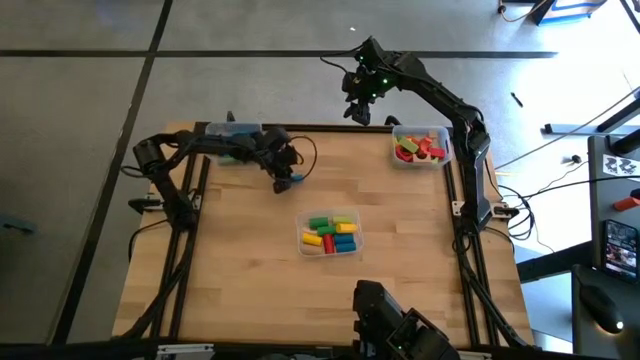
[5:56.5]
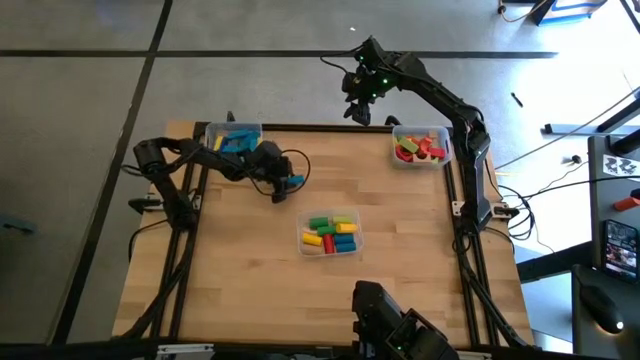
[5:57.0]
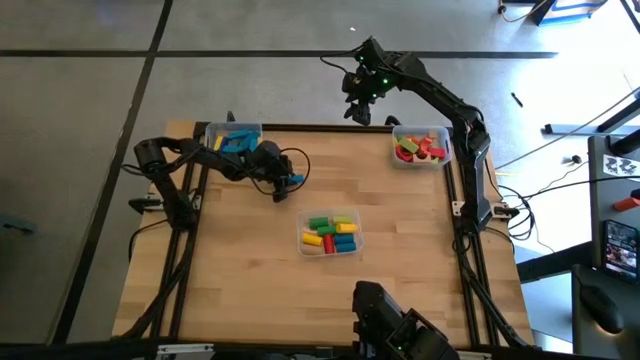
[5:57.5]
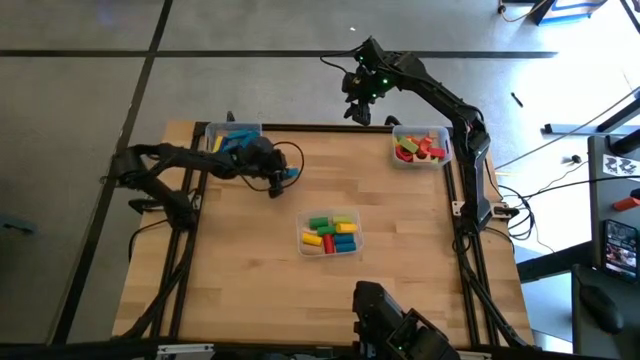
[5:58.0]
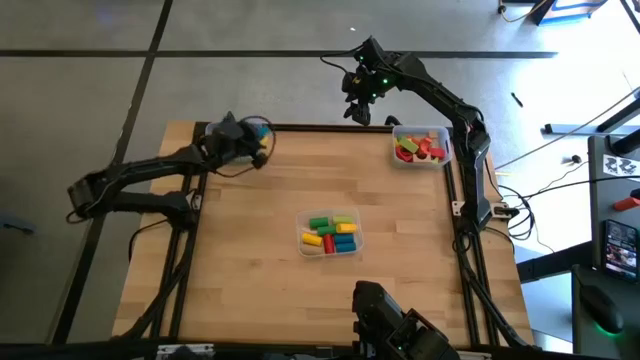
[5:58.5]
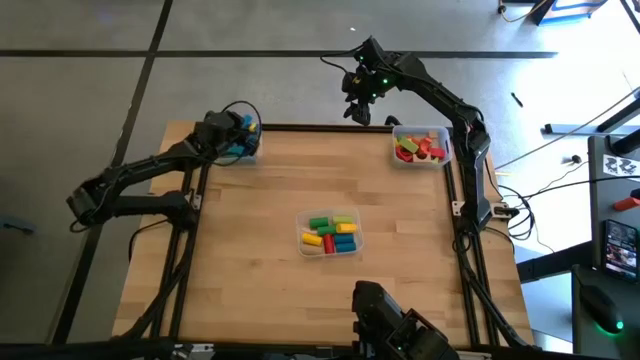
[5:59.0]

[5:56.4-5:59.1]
Task: Sort blocks by size
Put the blue rectangular block into the top left transparent bin

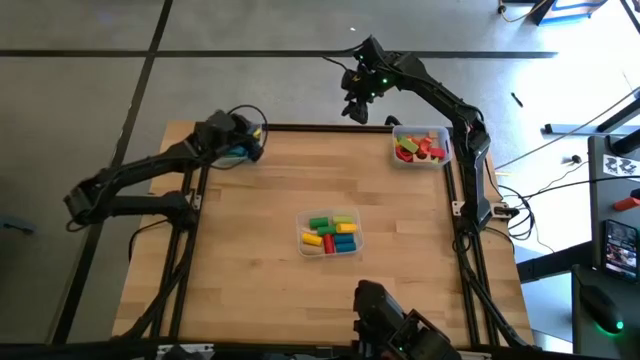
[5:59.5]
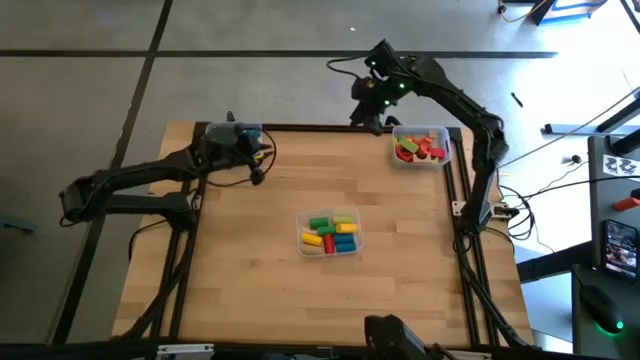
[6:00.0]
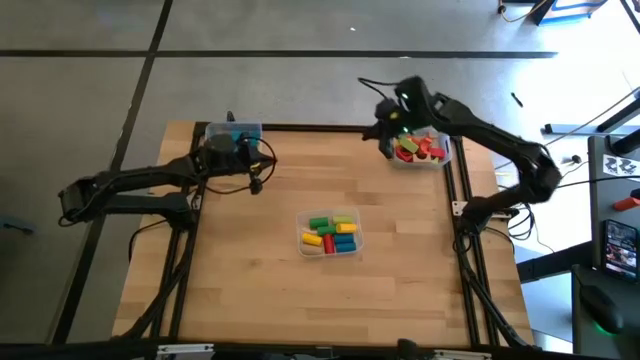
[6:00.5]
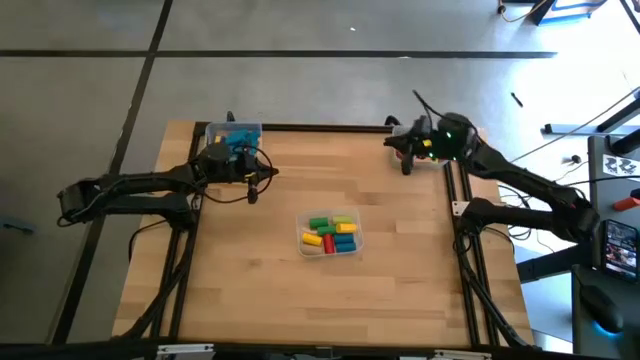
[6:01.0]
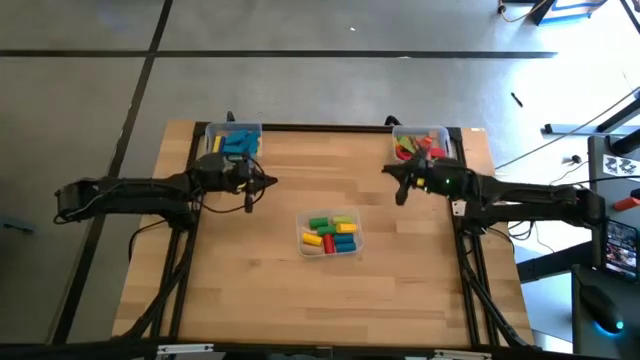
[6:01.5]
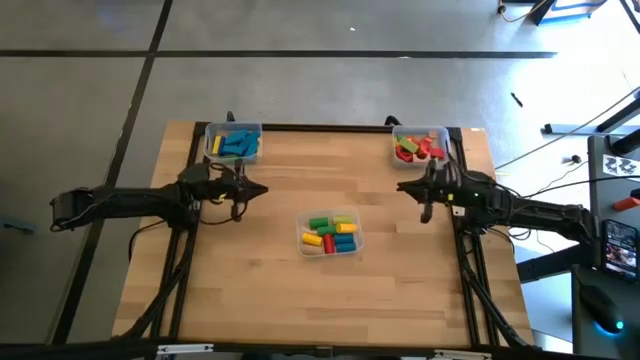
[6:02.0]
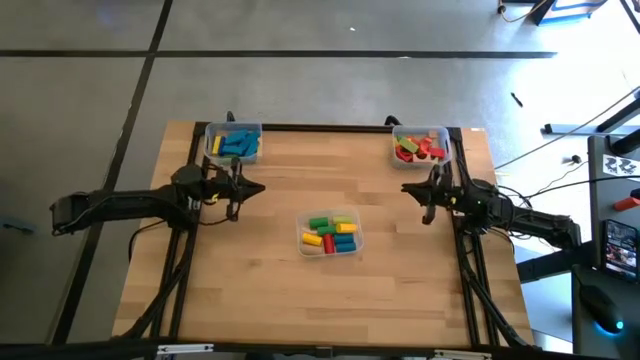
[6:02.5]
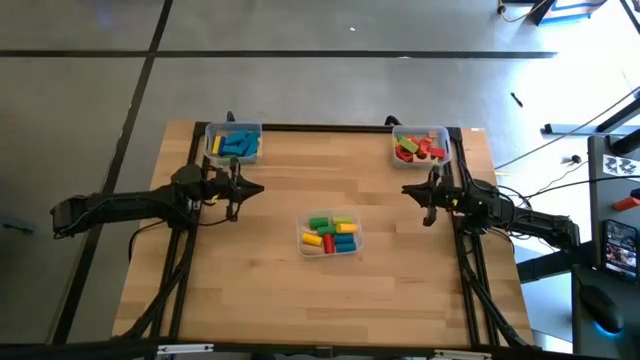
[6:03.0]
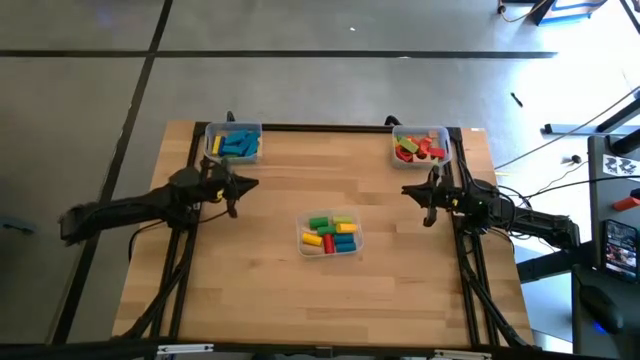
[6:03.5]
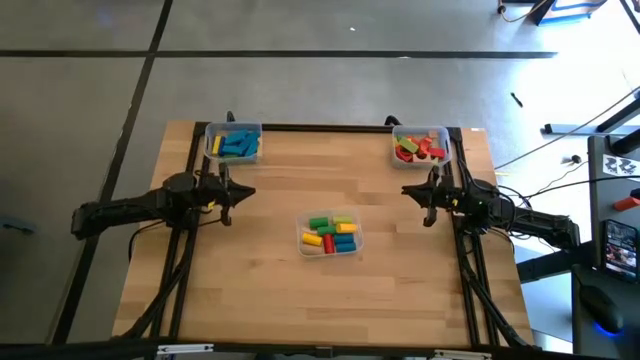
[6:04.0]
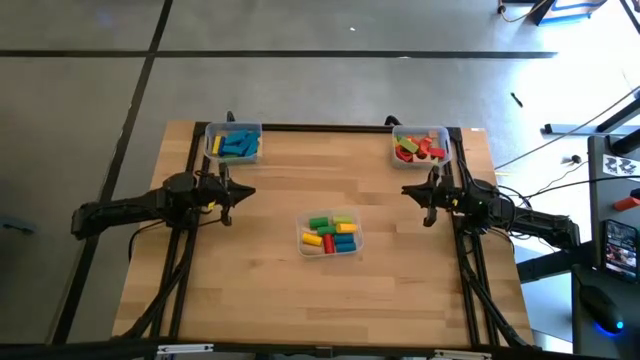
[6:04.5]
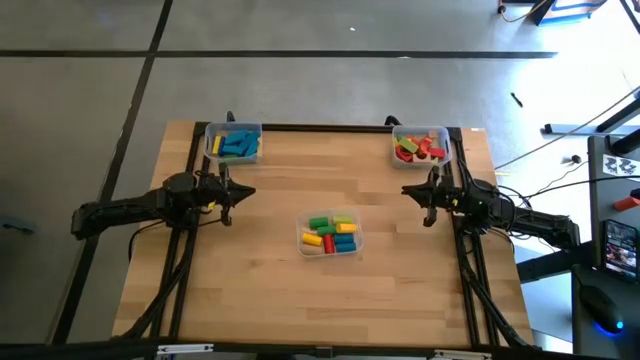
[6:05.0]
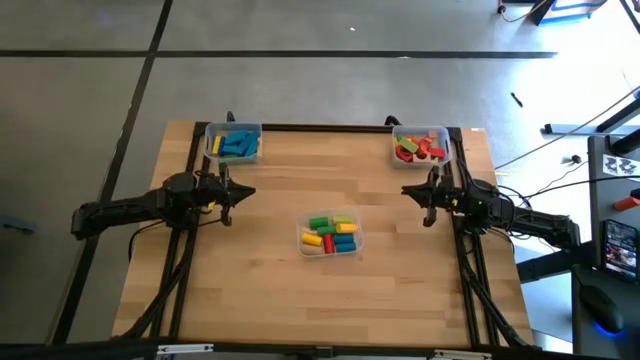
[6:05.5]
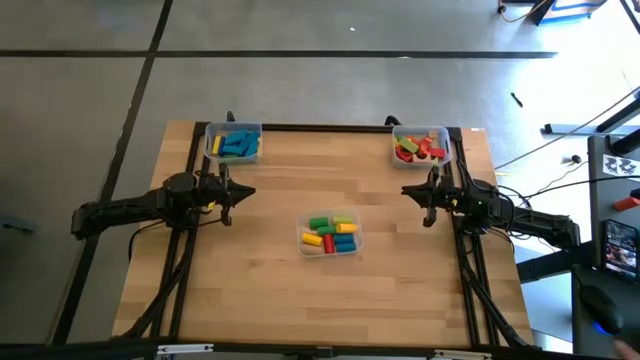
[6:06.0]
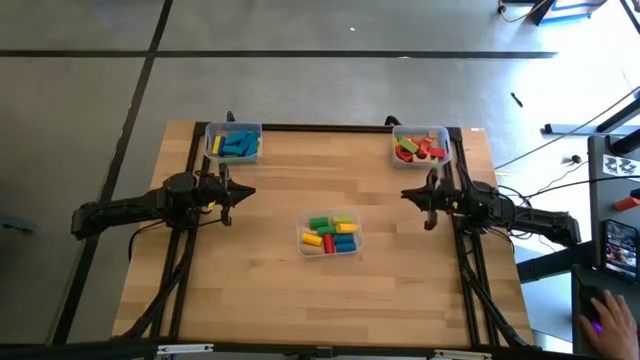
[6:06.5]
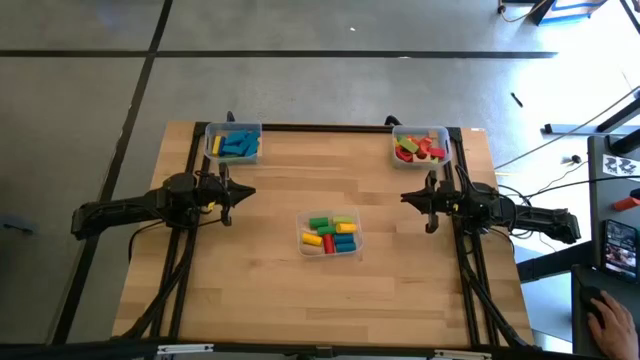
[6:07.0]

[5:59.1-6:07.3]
Return to Home Position

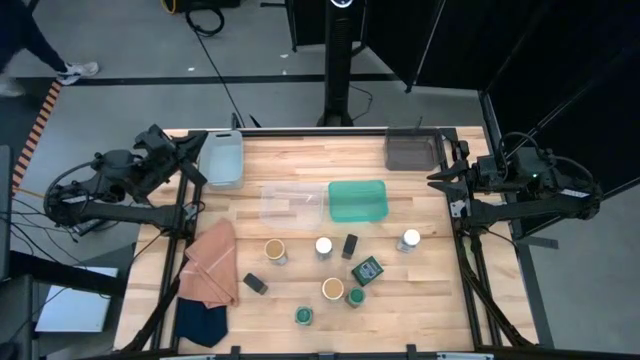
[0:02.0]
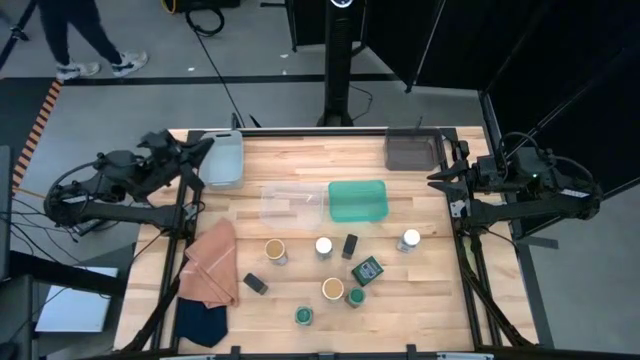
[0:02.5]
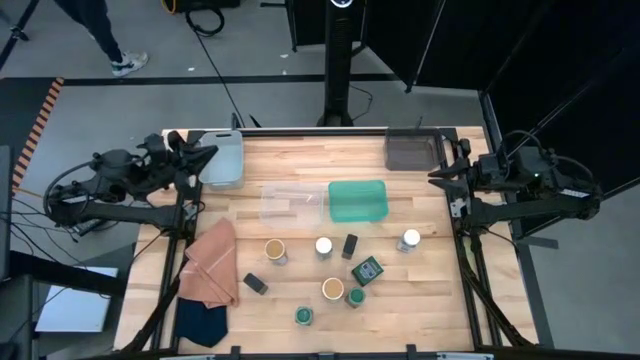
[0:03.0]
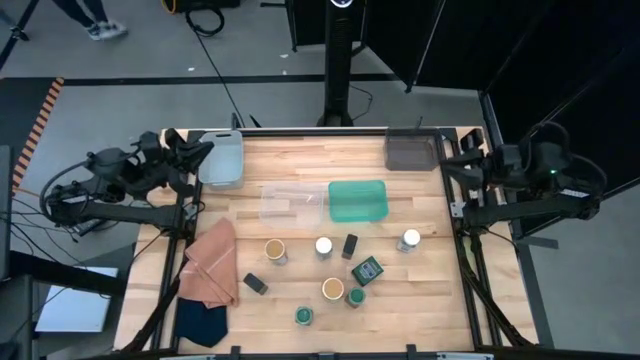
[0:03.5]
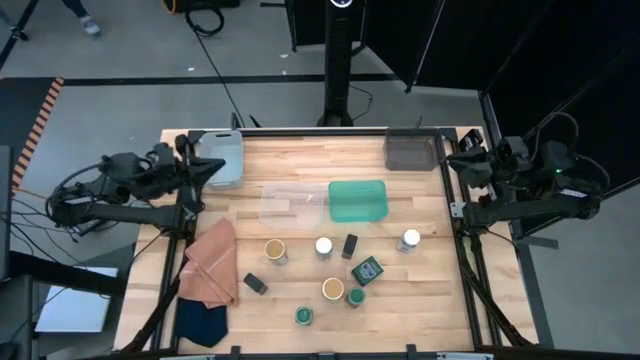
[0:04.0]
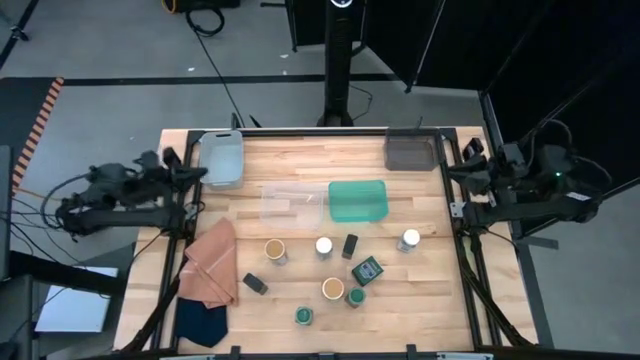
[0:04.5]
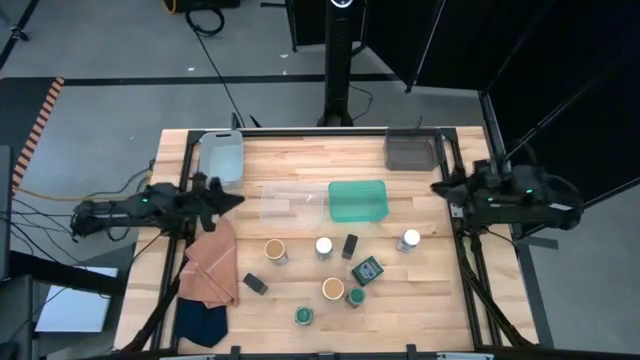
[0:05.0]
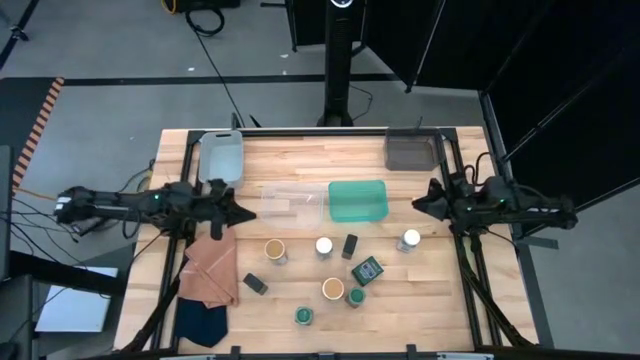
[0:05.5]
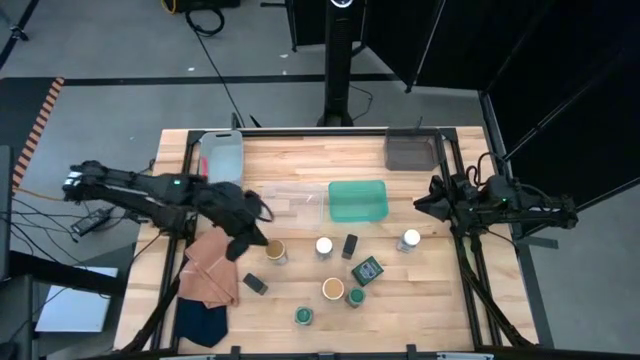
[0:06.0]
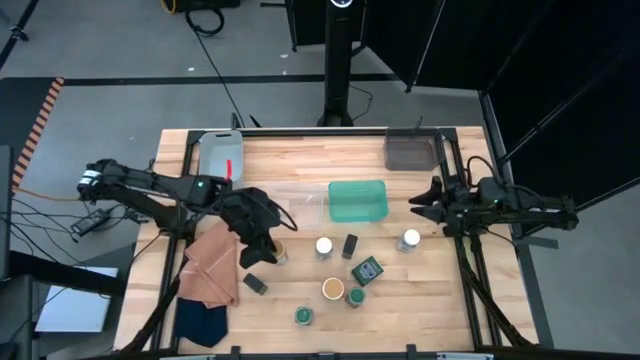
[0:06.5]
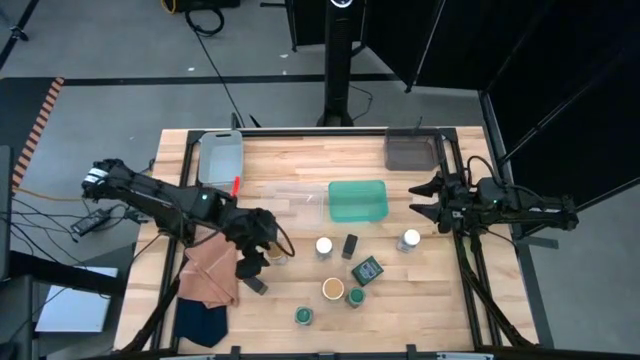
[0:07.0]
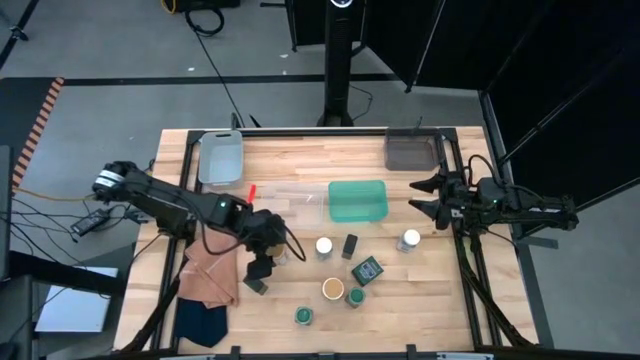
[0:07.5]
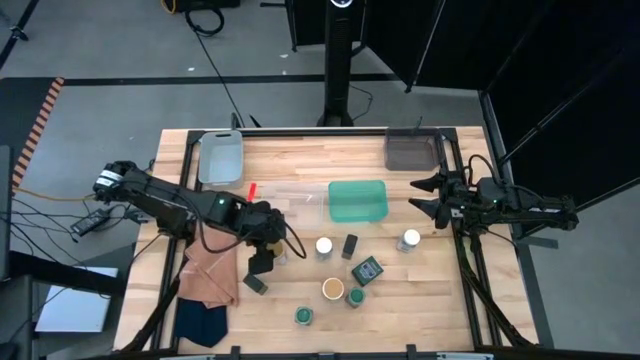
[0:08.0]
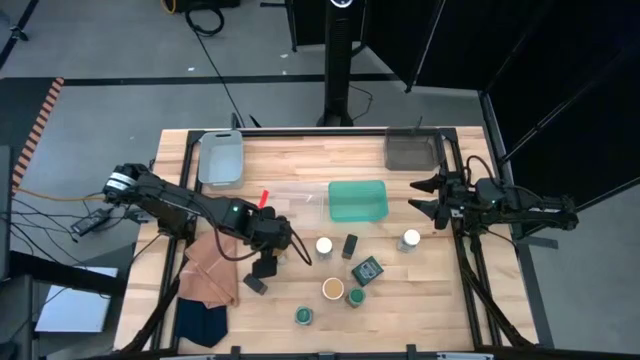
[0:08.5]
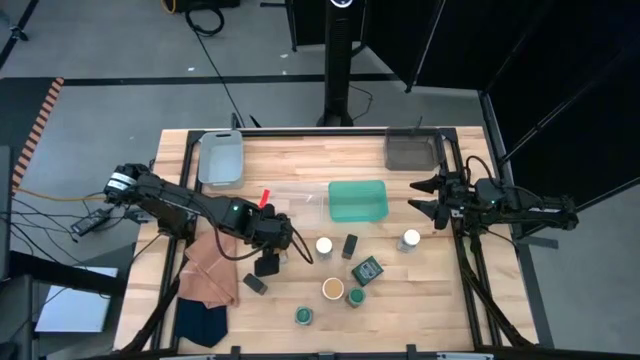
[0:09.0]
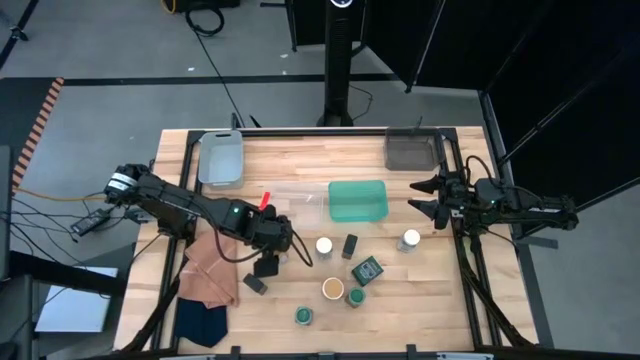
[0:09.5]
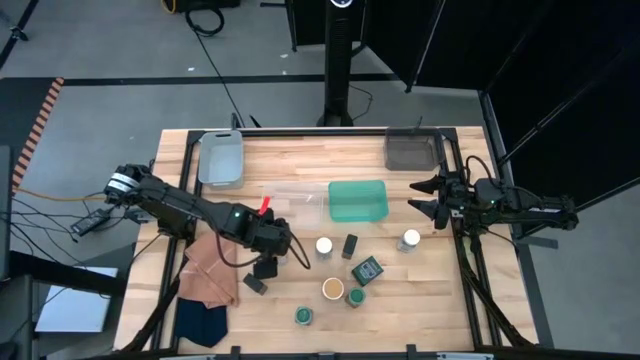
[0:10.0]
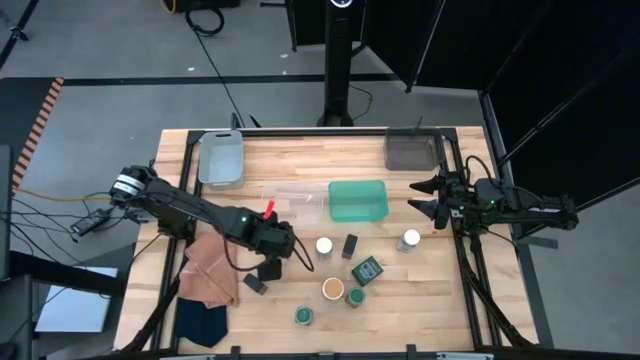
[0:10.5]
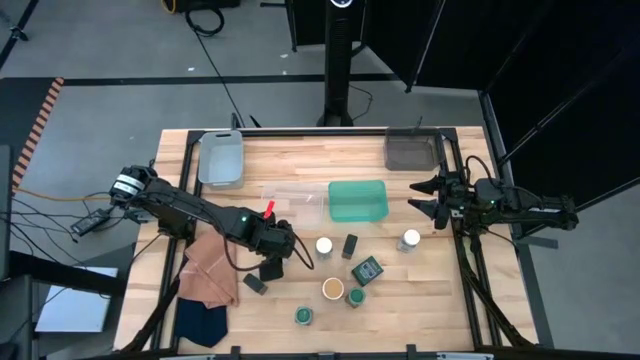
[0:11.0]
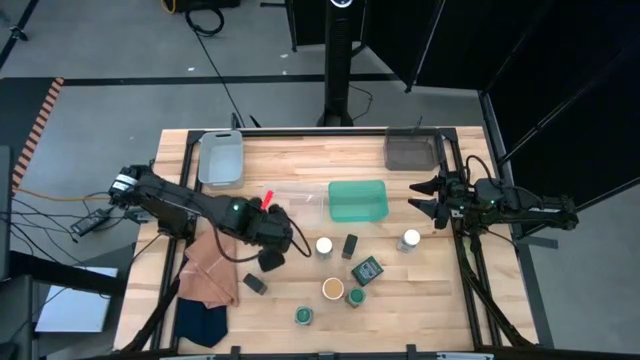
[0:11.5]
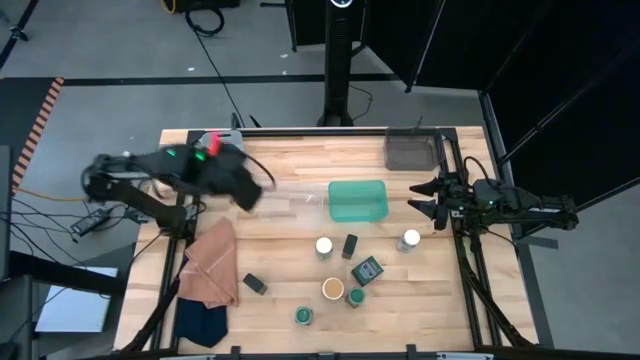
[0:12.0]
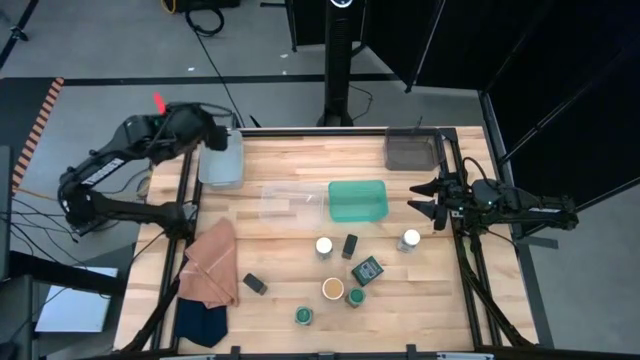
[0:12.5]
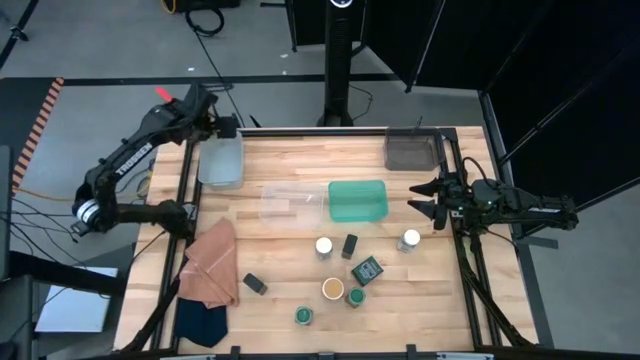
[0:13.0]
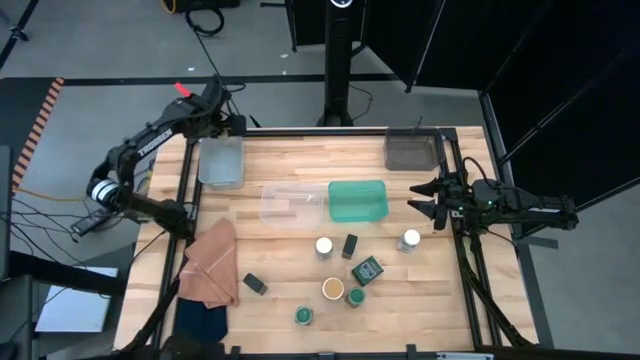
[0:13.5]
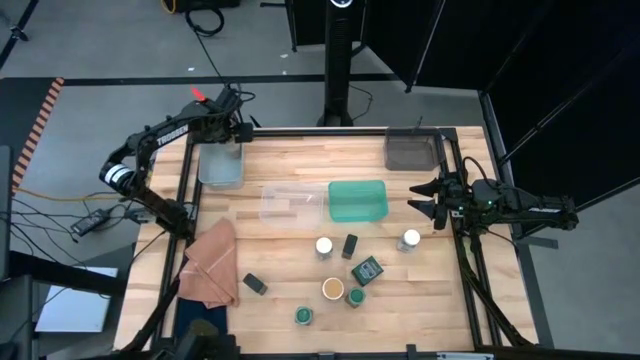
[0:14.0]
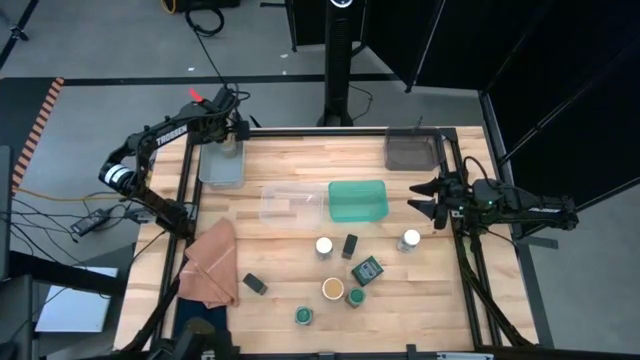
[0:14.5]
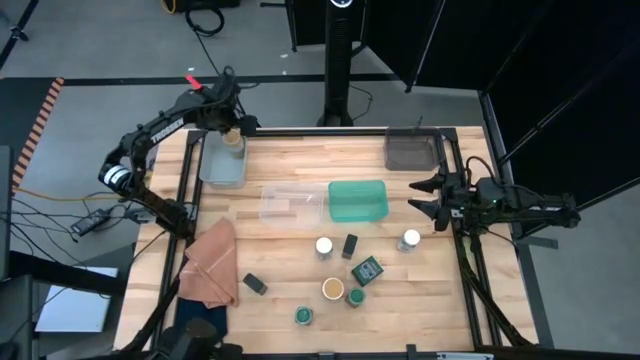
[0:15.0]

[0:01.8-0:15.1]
Task: Sort spices by type
Put the top brown seasoning bottle into the gray bin
